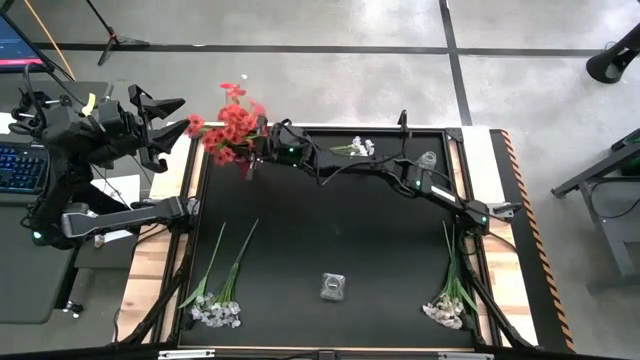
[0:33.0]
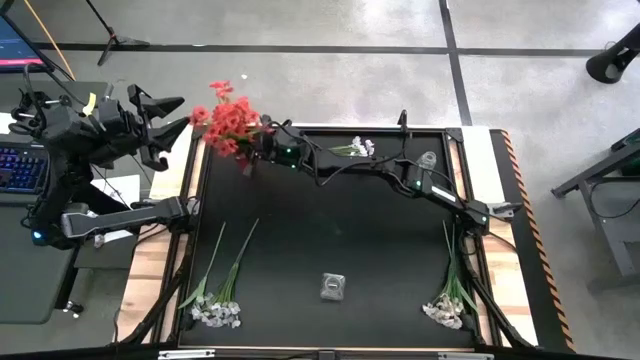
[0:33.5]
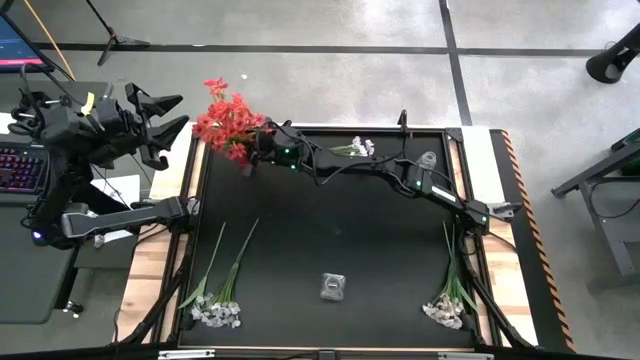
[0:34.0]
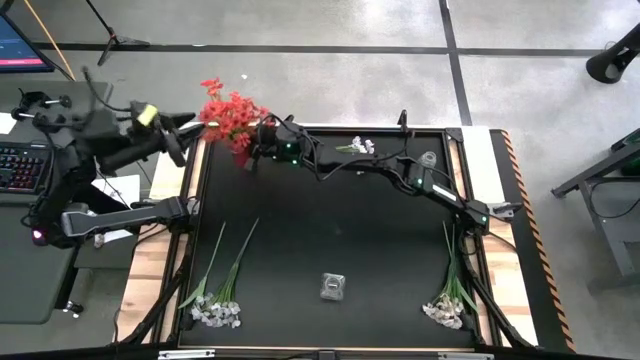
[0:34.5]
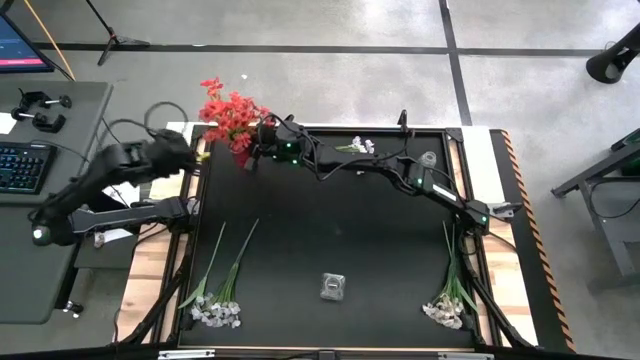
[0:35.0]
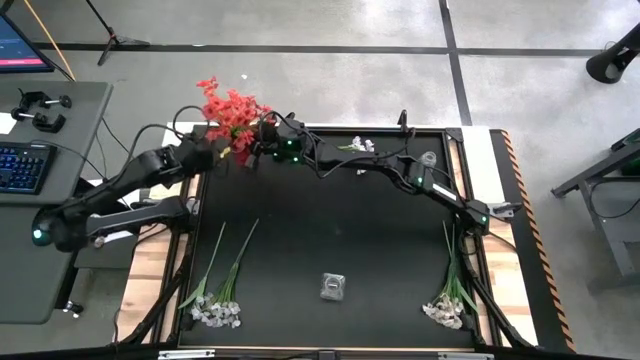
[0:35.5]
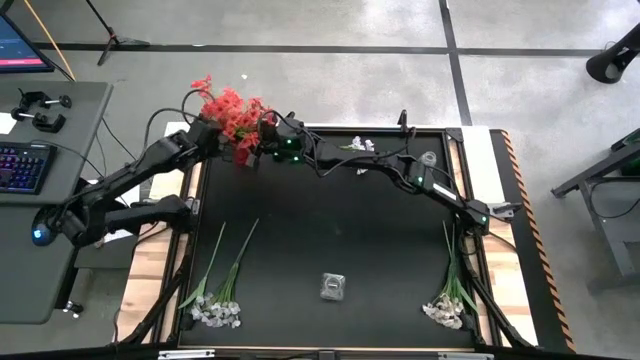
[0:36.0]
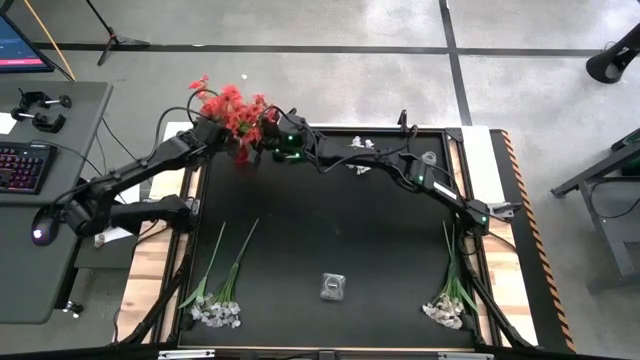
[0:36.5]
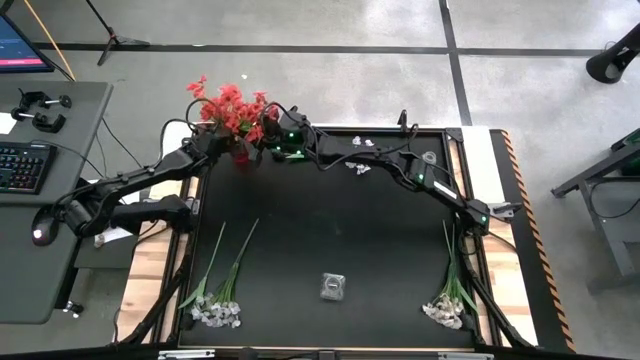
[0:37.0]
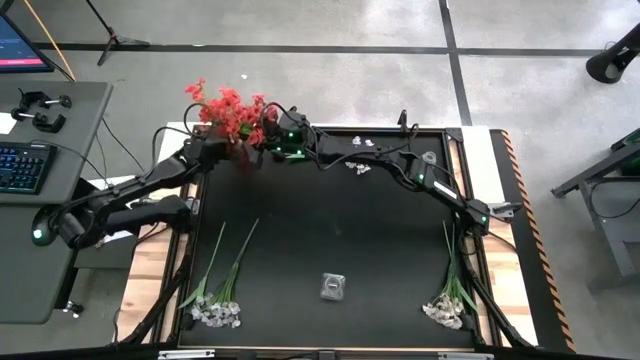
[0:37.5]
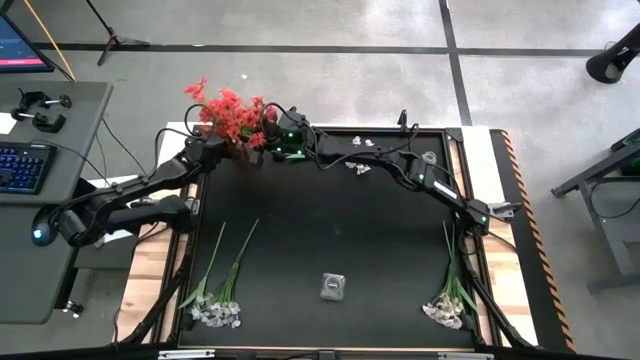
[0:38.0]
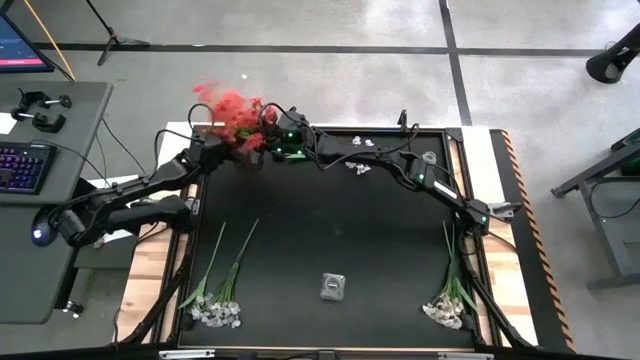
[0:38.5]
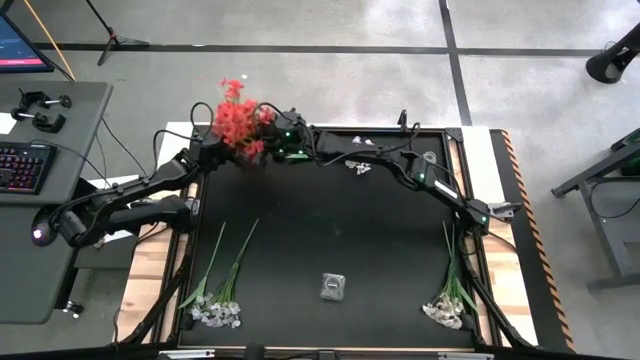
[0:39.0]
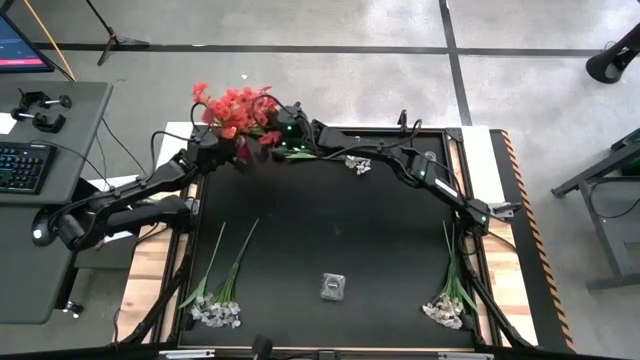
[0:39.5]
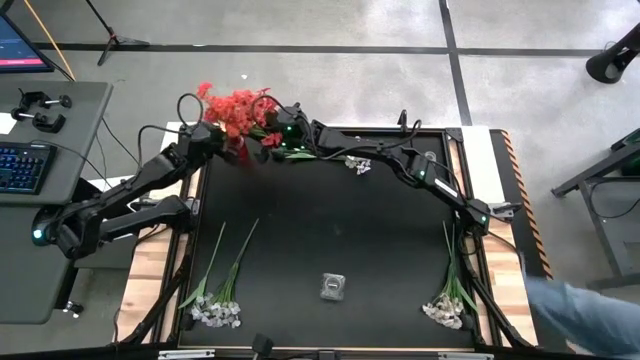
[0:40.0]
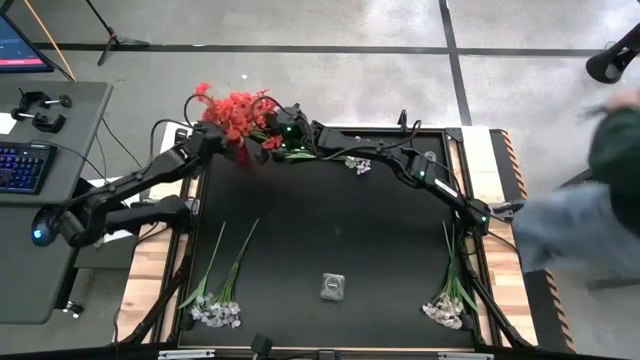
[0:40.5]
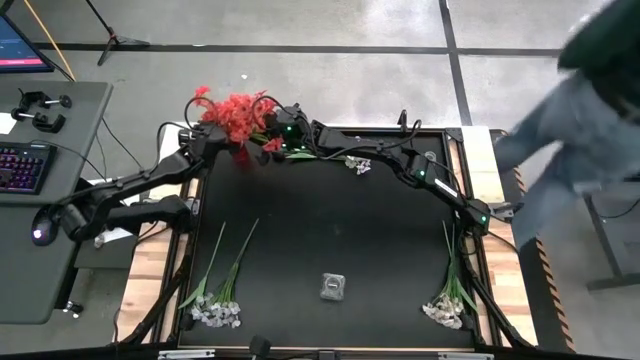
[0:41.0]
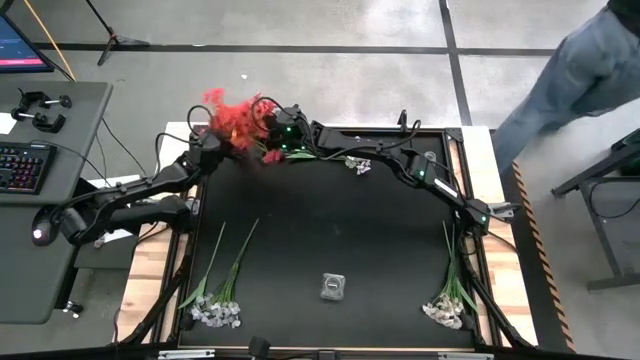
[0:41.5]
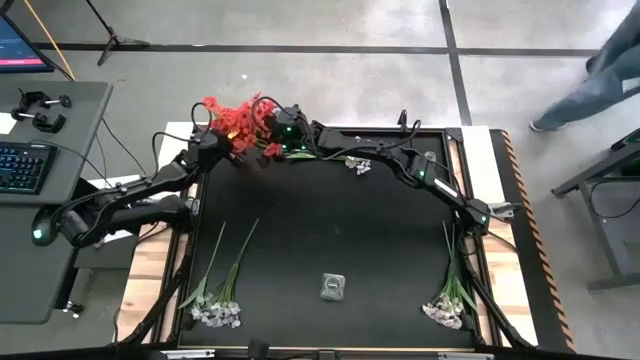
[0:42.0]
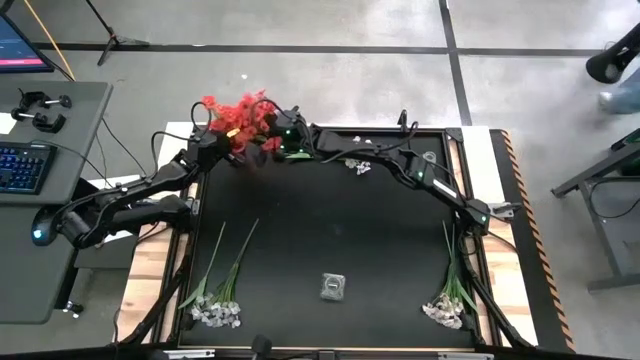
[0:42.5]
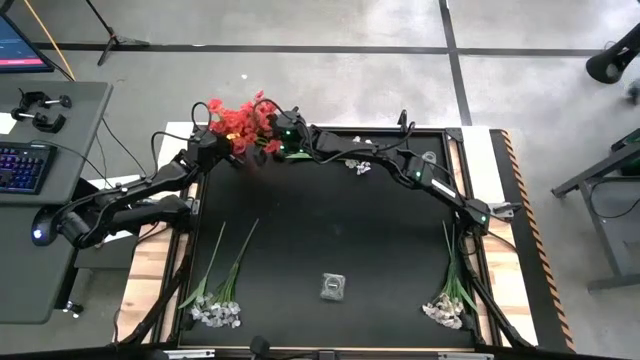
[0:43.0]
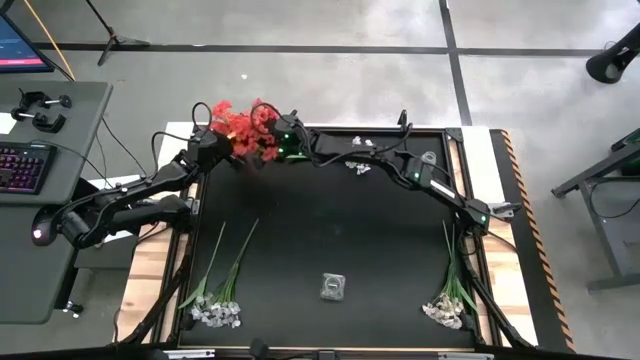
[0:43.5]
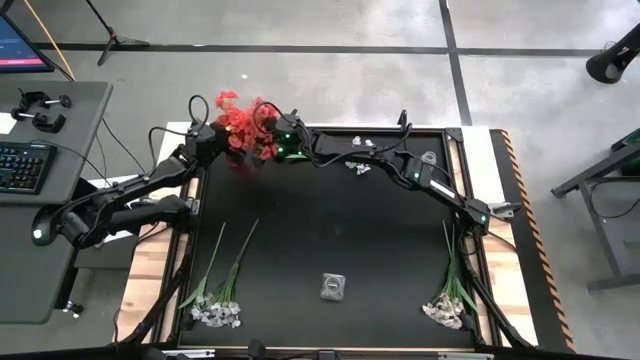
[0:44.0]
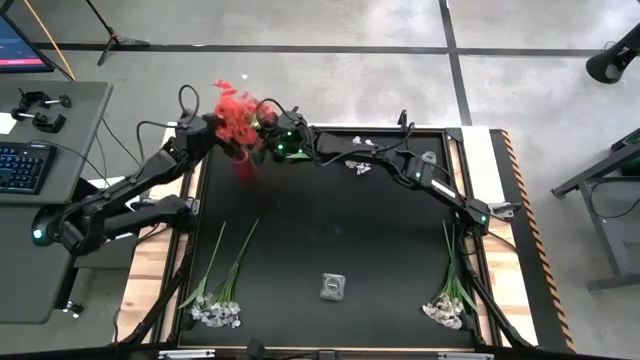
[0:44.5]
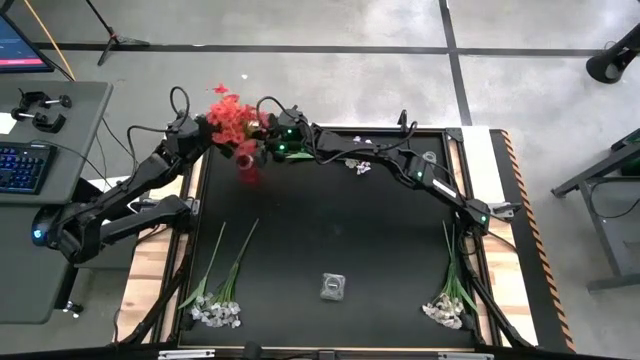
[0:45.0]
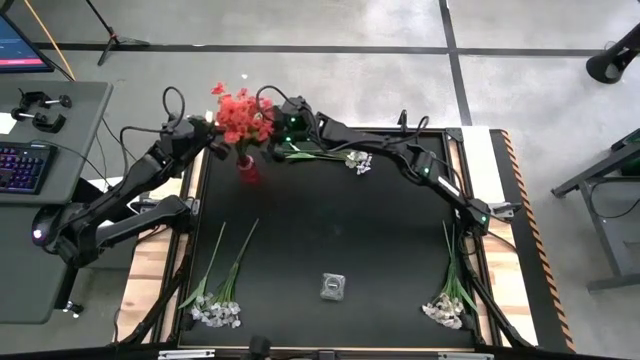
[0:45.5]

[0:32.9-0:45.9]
Task: Sort flowers into vase by color
Put the orange flowers into the red vase

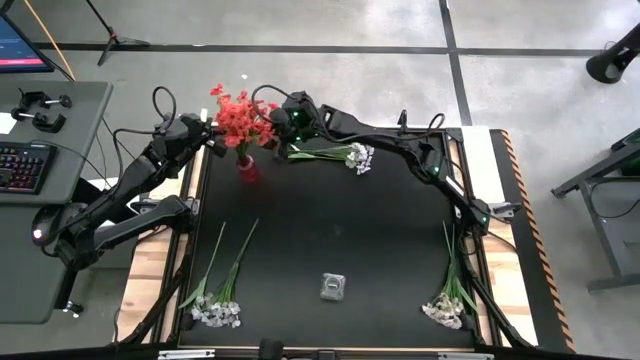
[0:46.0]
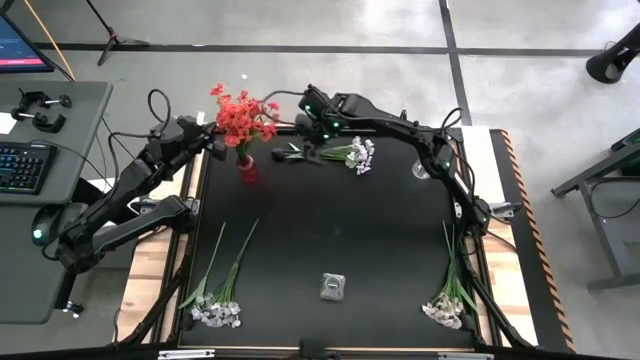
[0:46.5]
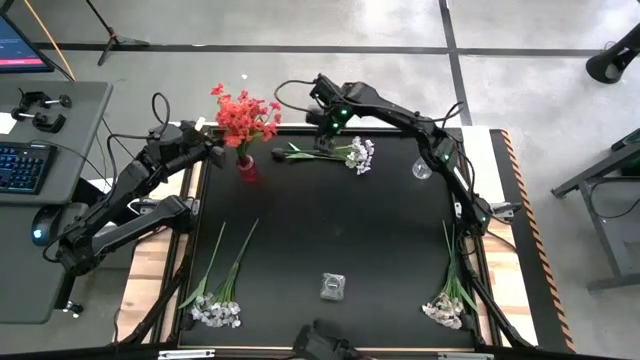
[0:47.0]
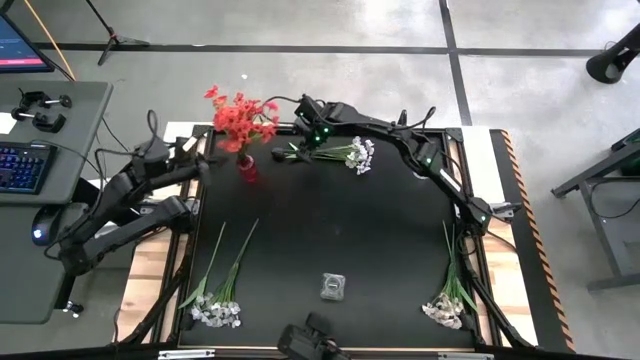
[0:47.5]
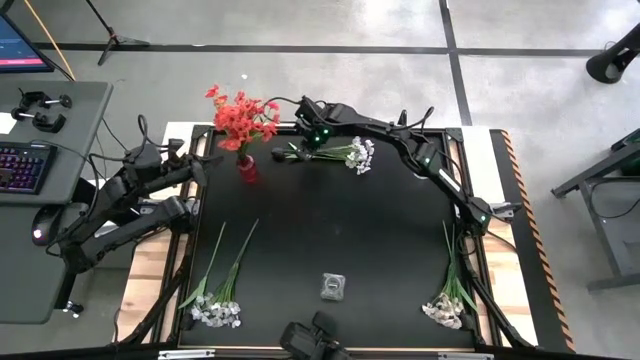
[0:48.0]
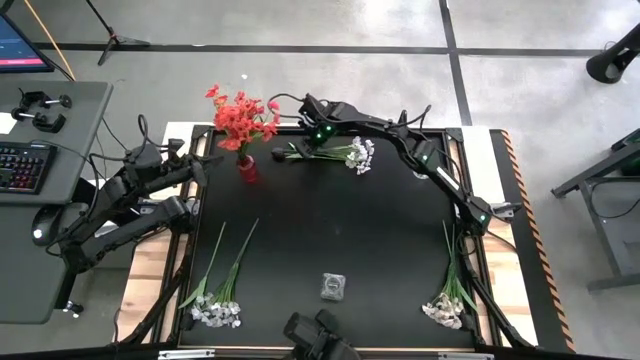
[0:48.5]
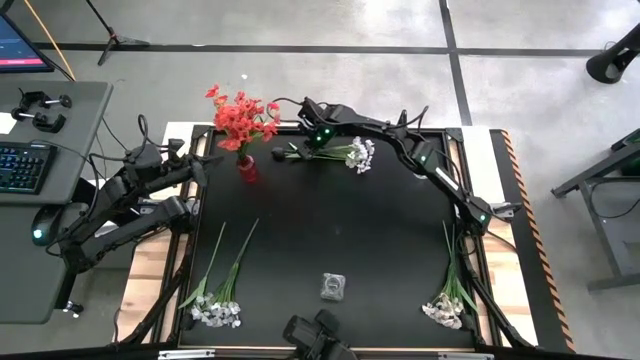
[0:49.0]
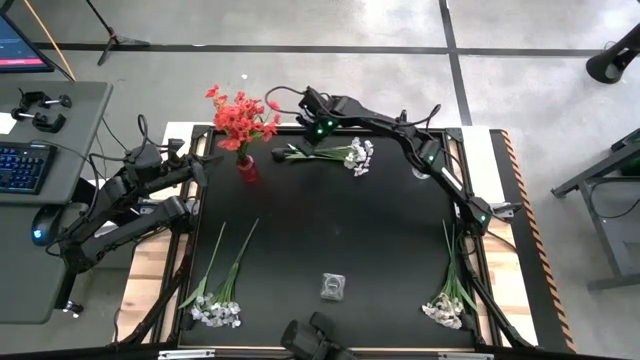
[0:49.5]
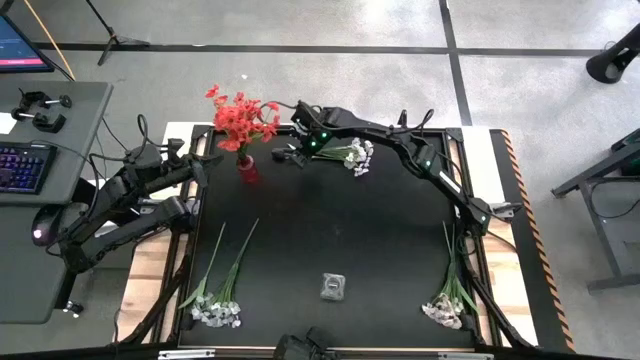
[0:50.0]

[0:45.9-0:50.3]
Put the top white flowers into the bottom transparent vase

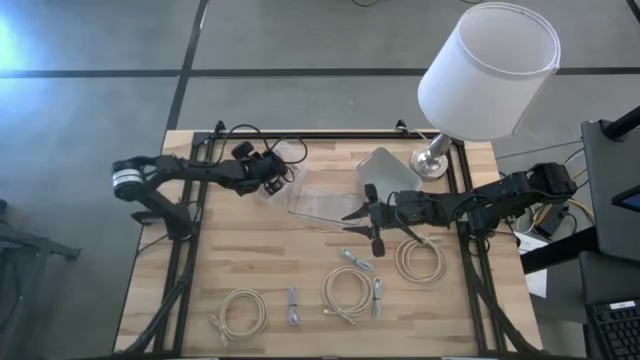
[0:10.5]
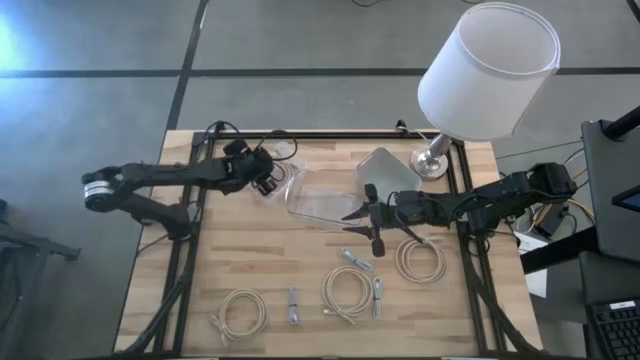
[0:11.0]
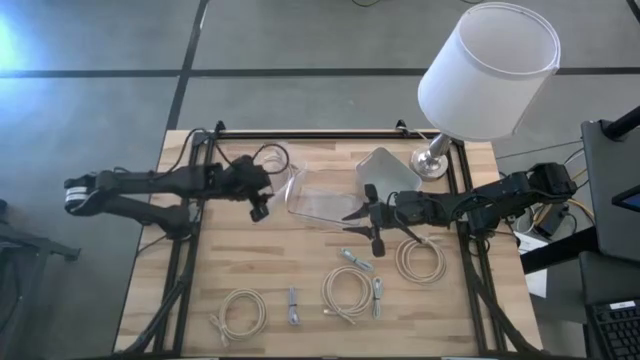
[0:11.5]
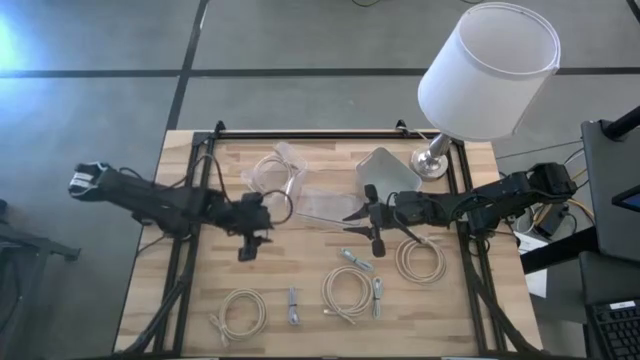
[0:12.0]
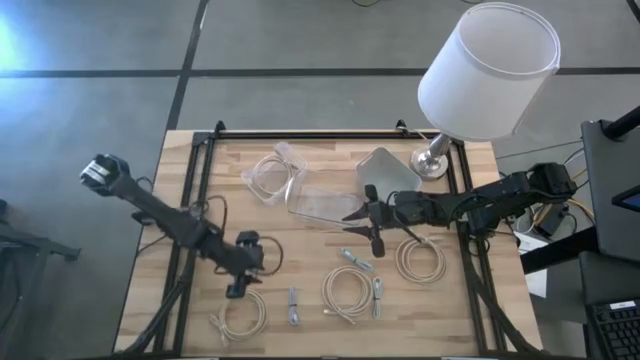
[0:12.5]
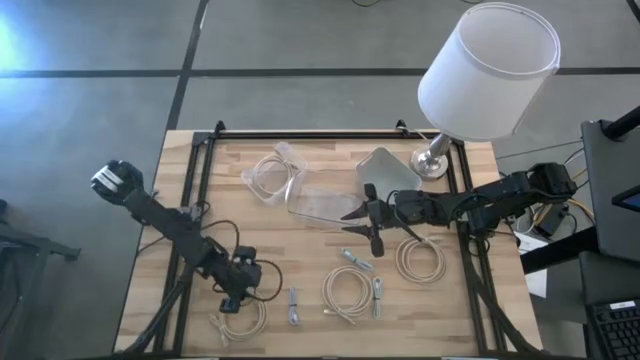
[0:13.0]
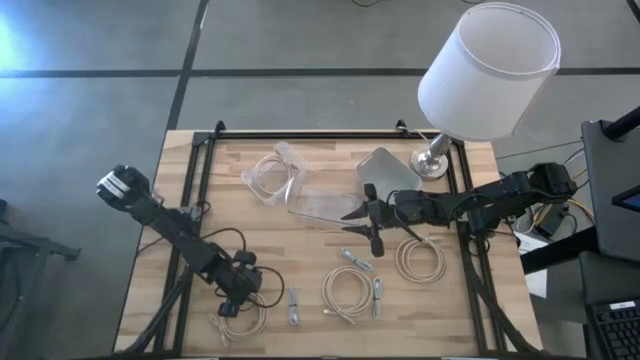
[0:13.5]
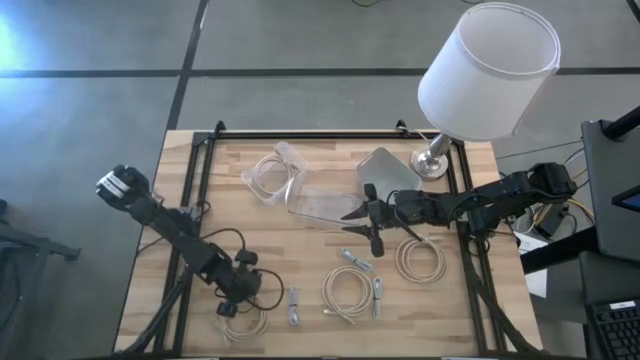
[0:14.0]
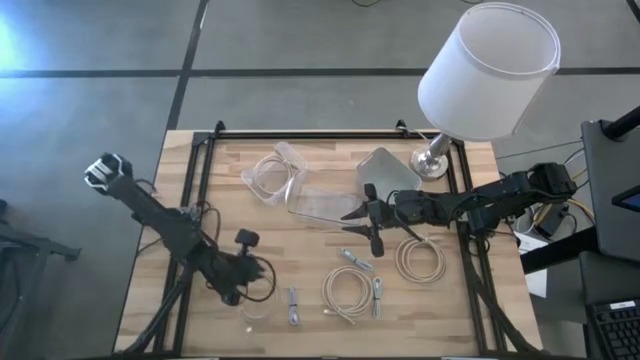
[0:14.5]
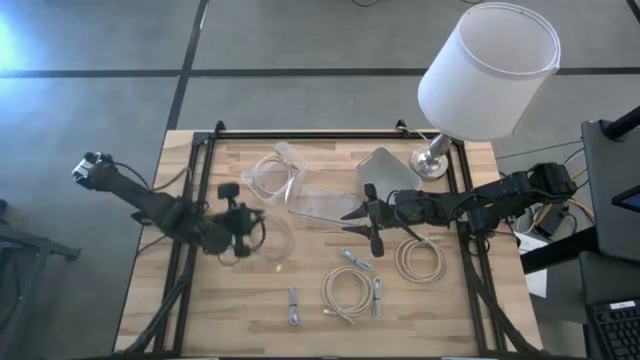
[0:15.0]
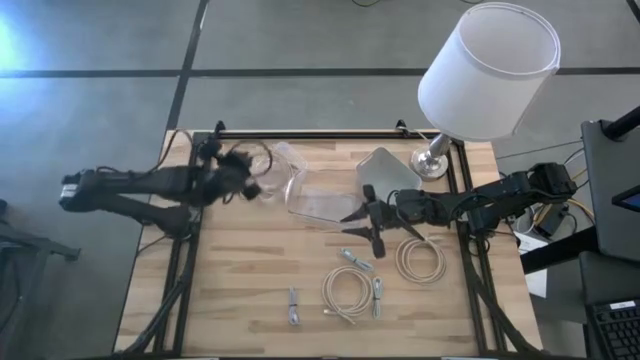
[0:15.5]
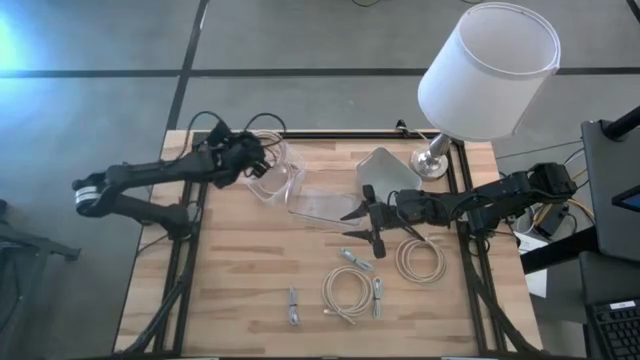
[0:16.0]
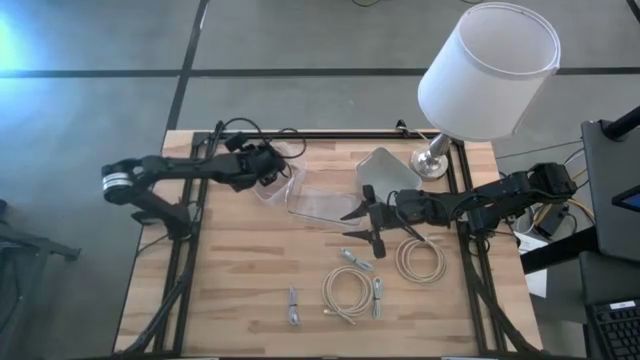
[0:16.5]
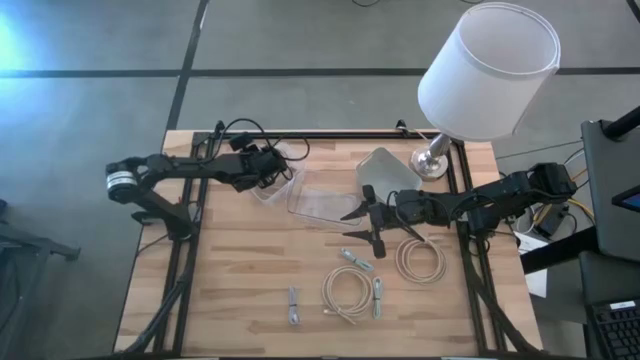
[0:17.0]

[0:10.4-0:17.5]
Task: Pick & Place USB Port
Put the brown USB cable into the white bin
